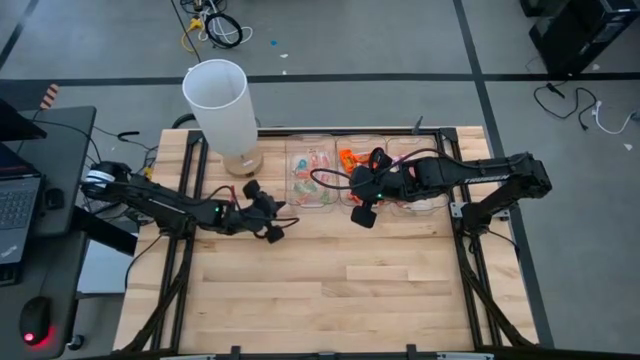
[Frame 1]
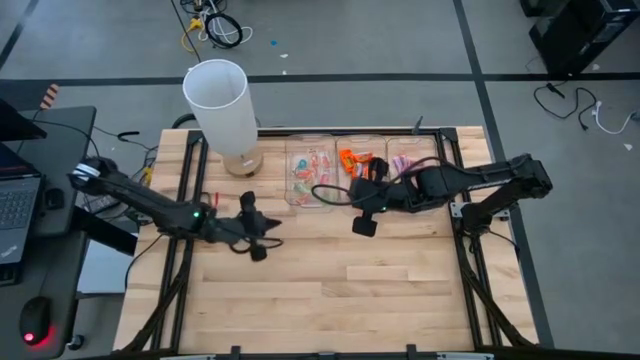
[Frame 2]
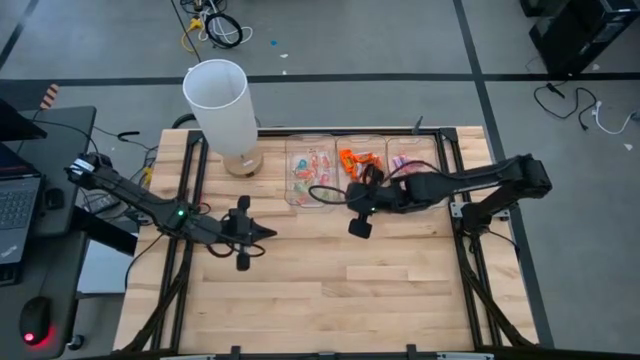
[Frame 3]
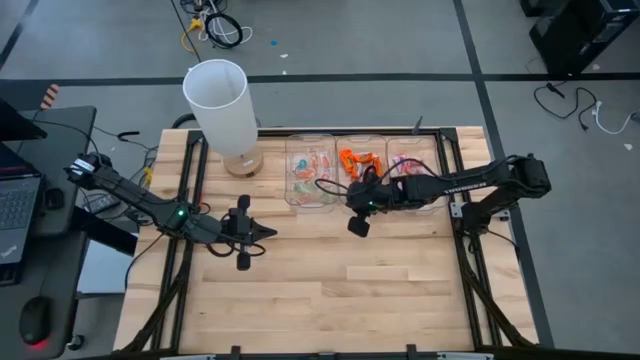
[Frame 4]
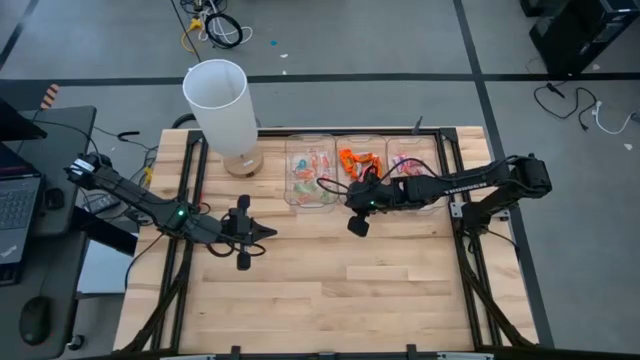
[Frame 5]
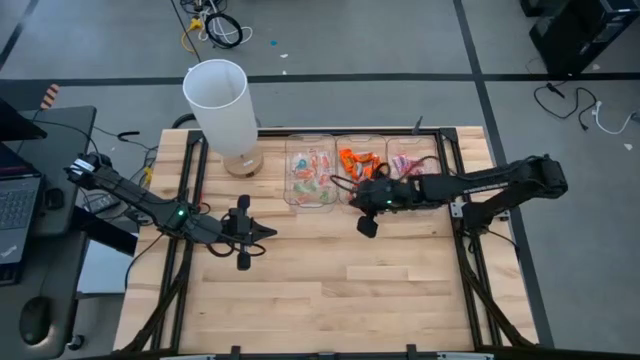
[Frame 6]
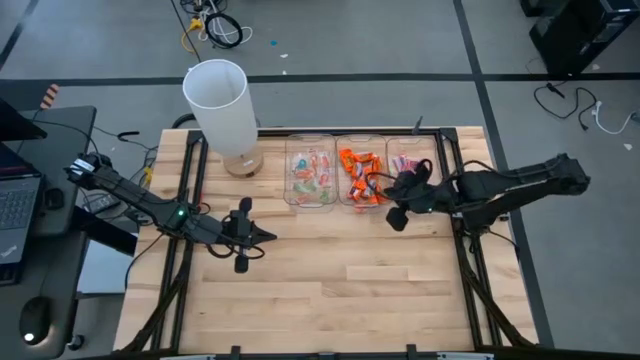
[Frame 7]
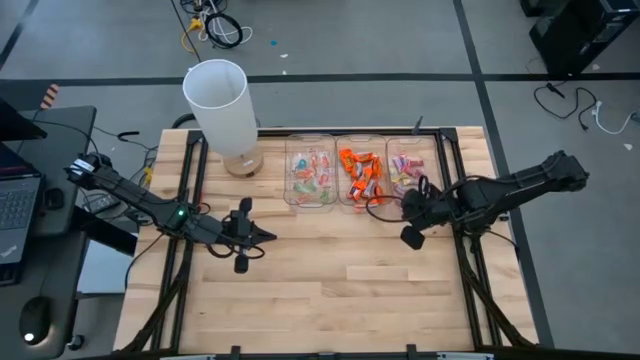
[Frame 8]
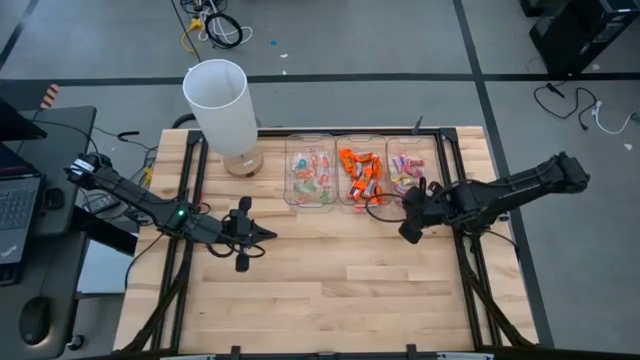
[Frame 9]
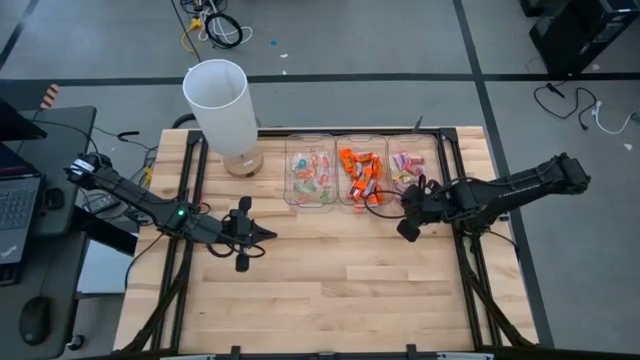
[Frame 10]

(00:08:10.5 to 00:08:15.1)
Task: Sort candy
Adjust the transparent bins to align them on the table

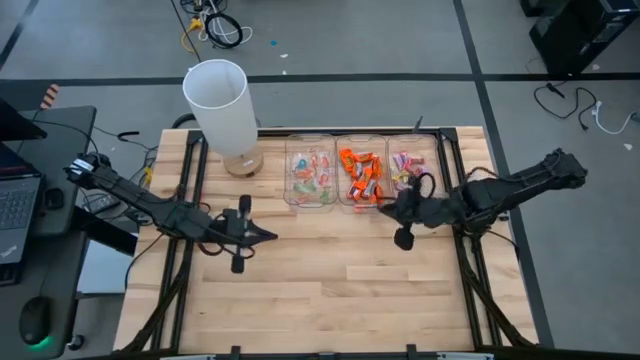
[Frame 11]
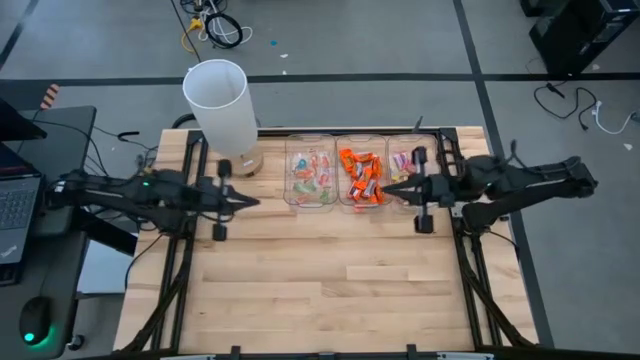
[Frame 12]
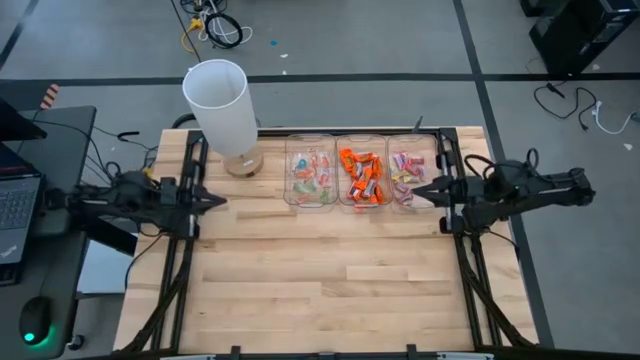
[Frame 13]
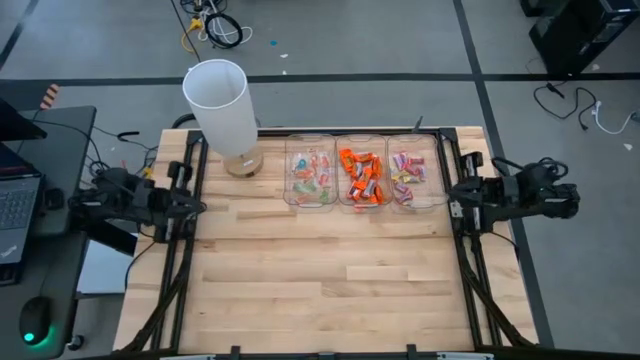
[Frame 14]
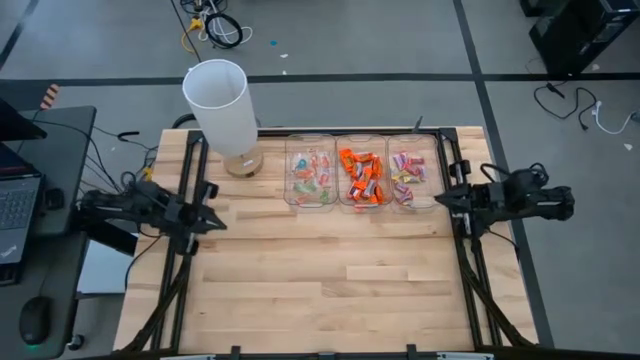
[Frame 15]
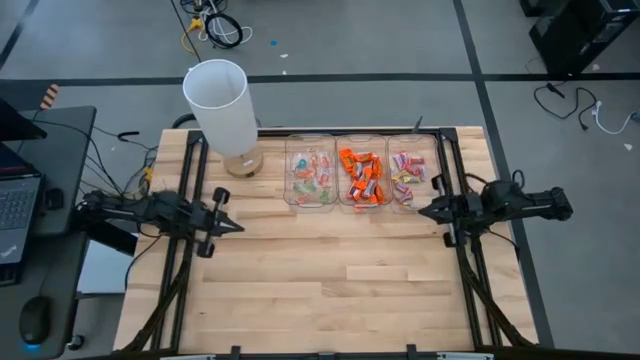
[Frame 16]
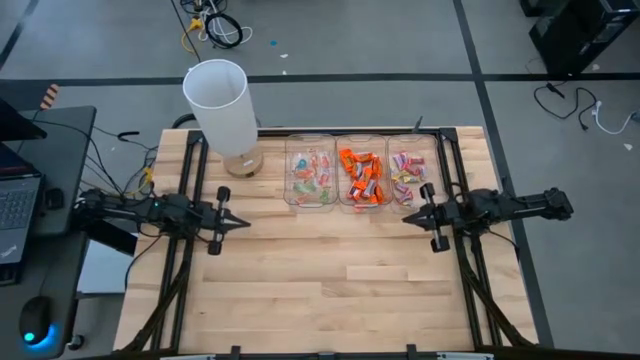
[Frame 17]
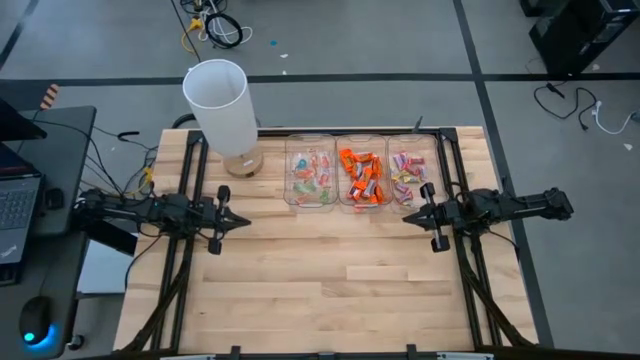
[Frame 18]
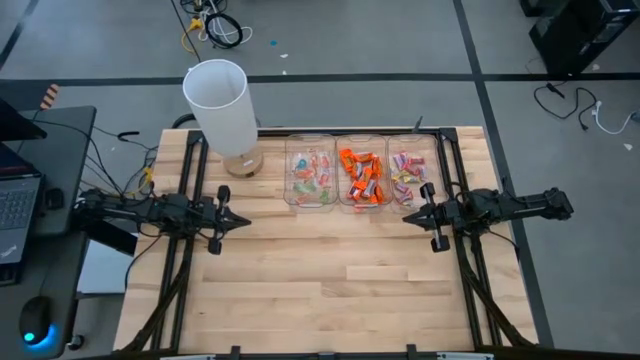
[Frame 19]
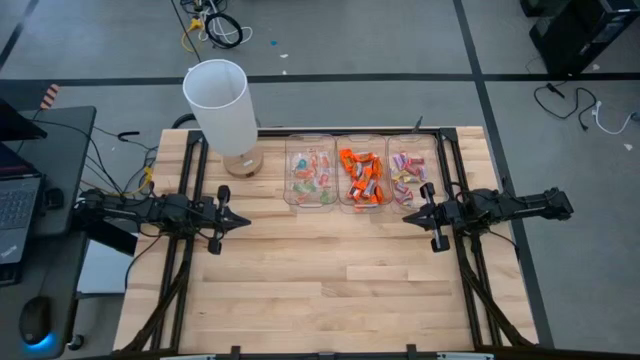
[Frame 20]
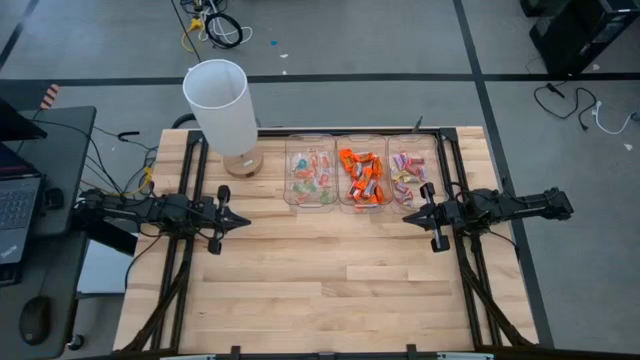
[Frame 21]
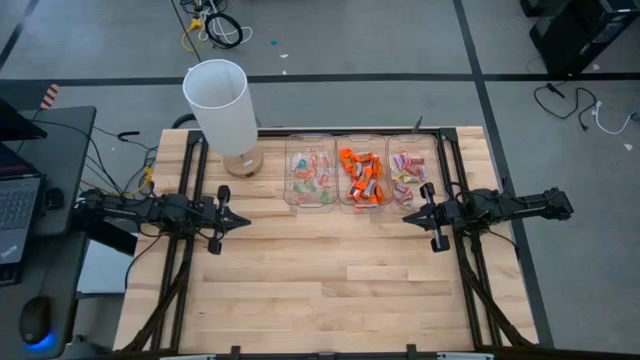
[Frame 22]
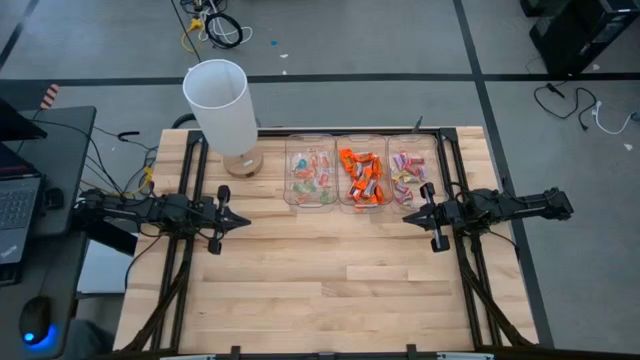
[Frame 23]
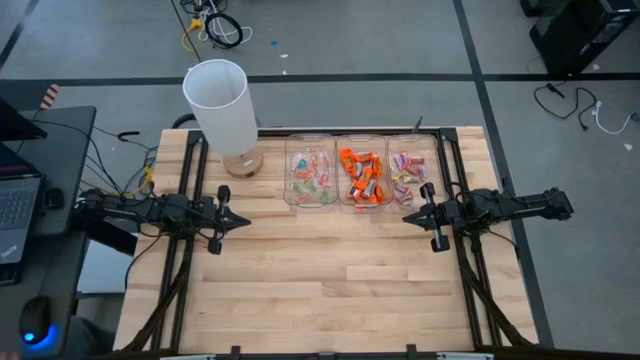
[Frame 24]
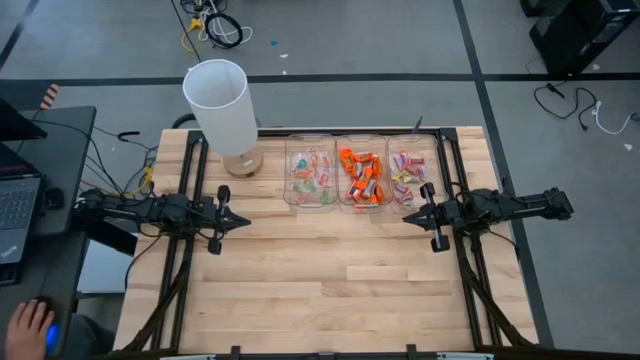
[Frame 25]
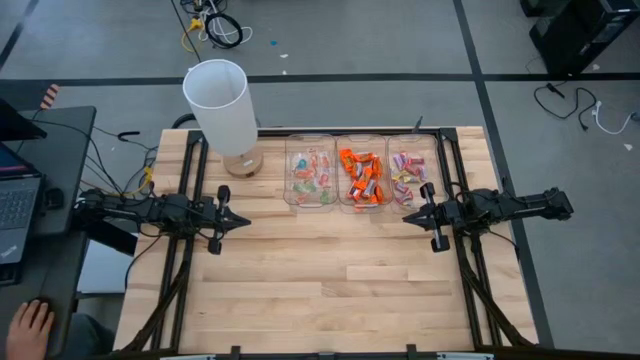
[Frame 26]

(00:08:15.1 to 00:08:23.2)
Return to Home Position

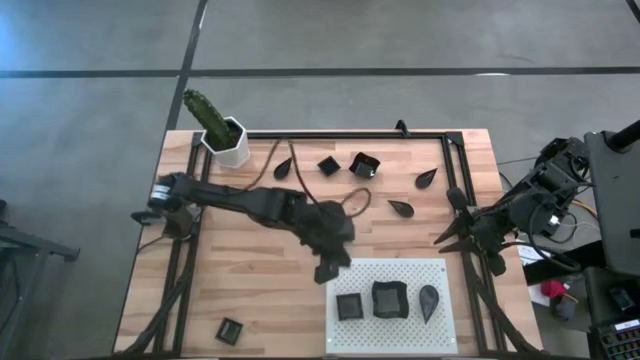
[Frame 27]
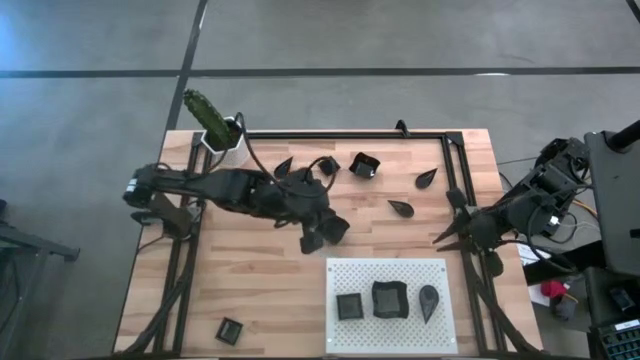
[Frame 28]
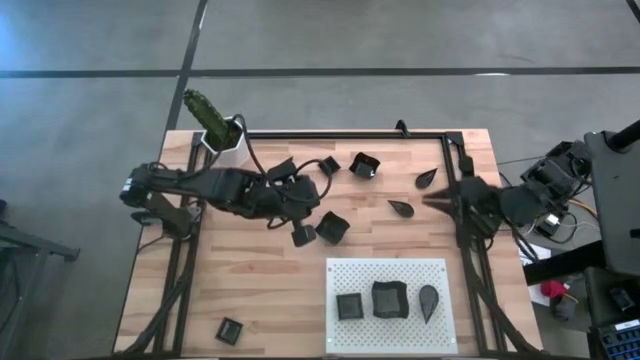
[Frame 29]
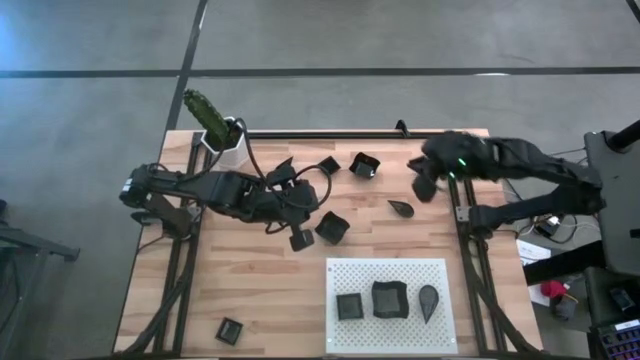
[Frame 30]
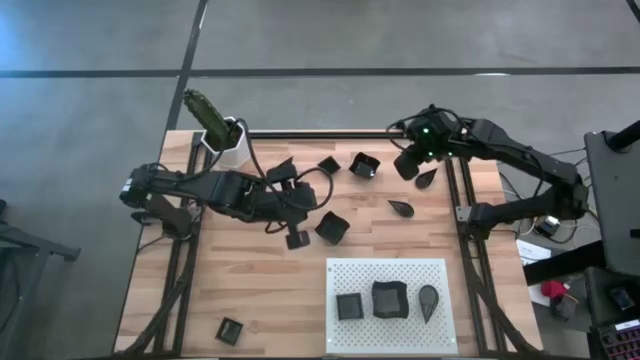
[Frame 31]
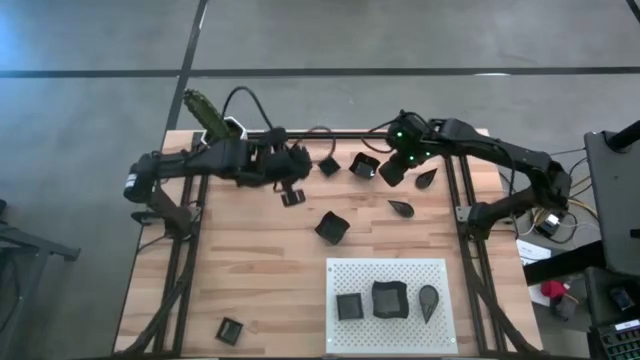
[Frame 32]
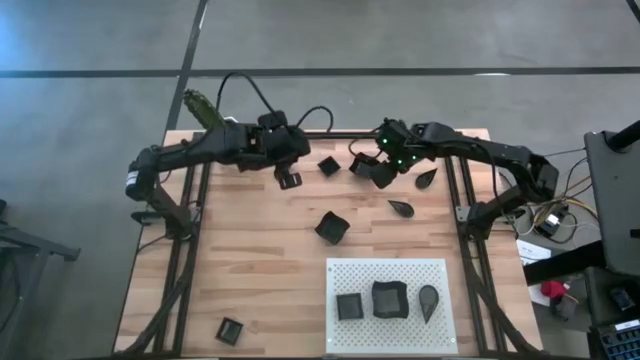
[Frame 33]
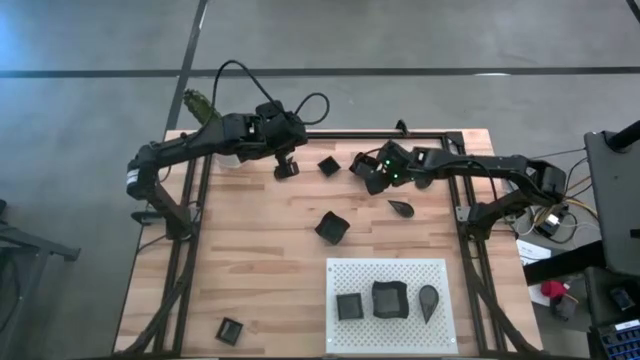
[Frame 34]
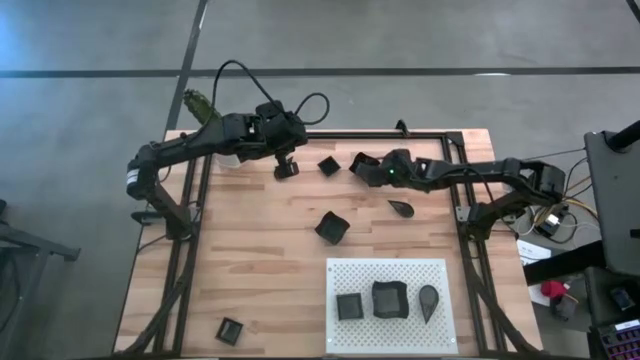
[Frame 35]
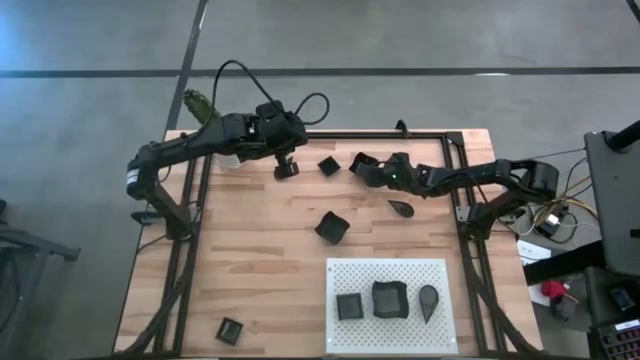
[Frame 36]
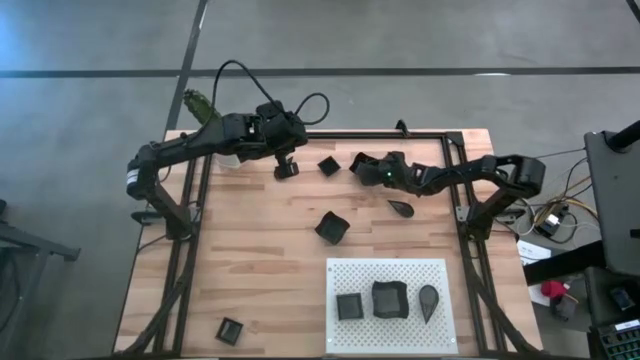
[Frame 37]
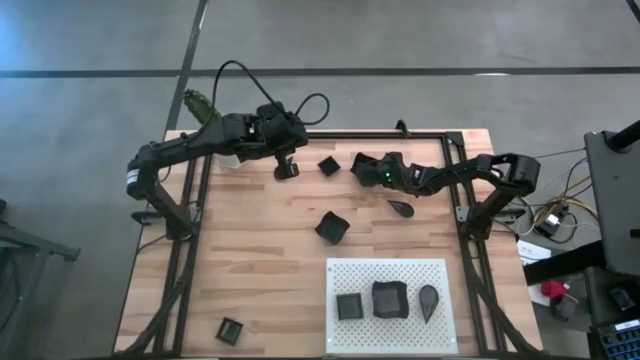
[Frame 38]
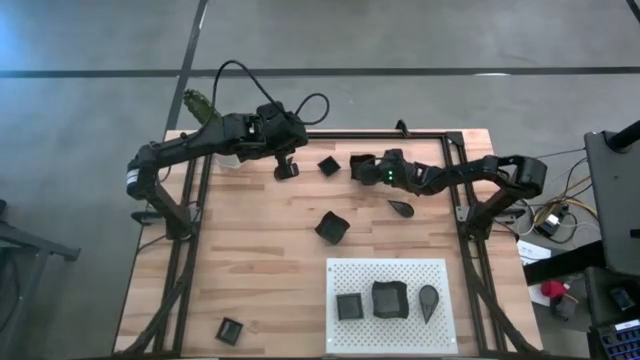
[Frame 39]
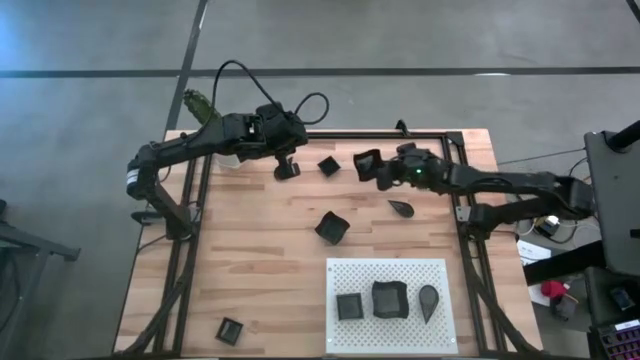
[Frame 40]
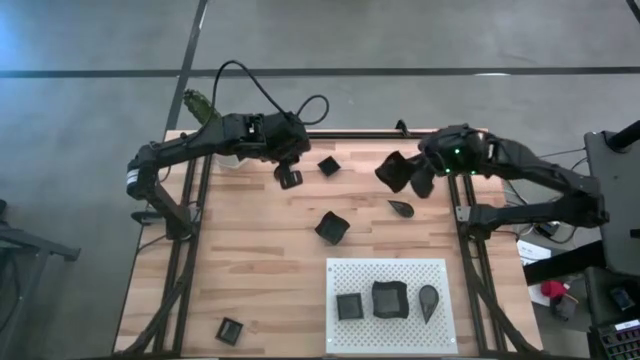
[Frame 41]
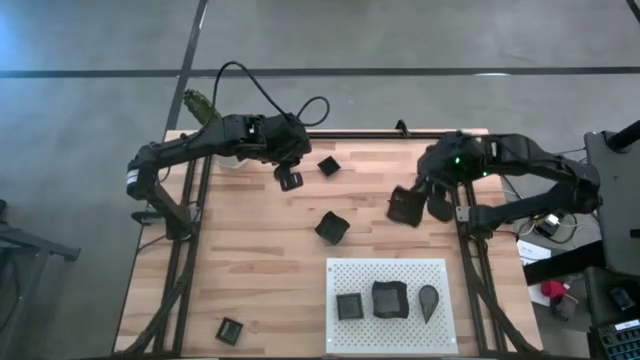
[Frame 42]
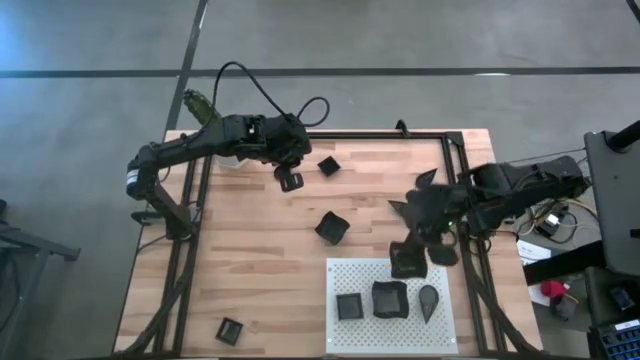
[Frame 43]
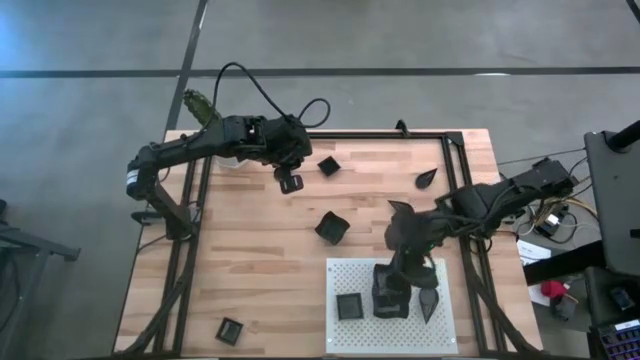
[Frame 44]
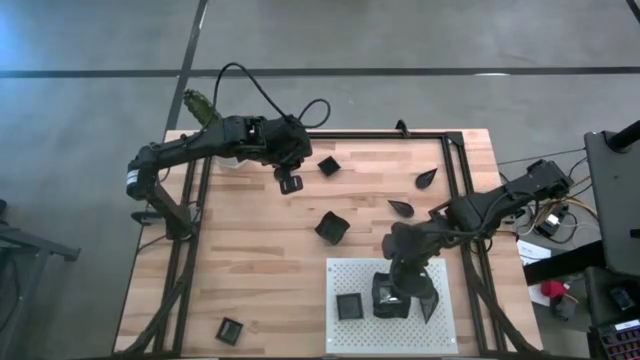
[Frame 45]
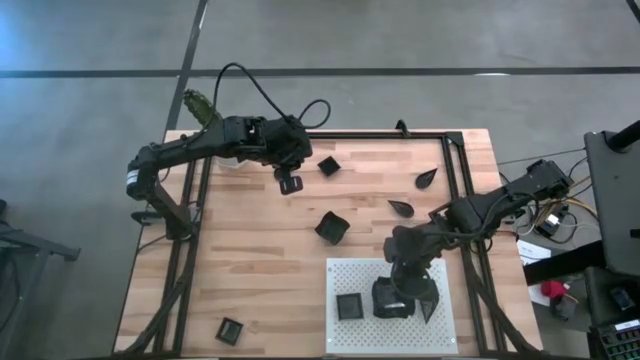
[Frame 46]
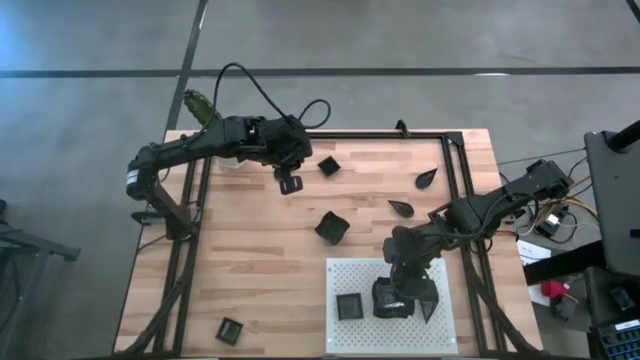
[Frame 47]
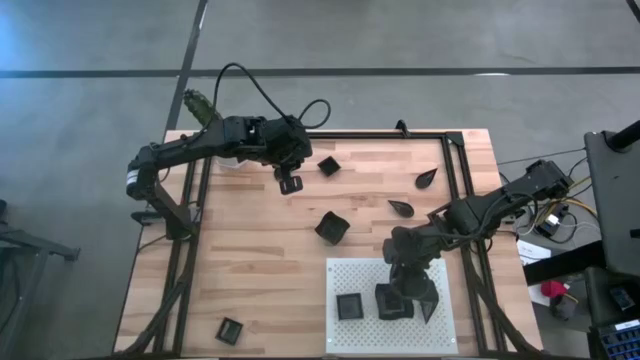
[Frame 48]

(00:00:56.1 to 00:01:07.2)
Task: Pick & Place Mini shaped plates
Stack the distorted square plate on top of the distorted square plate on the shelf
